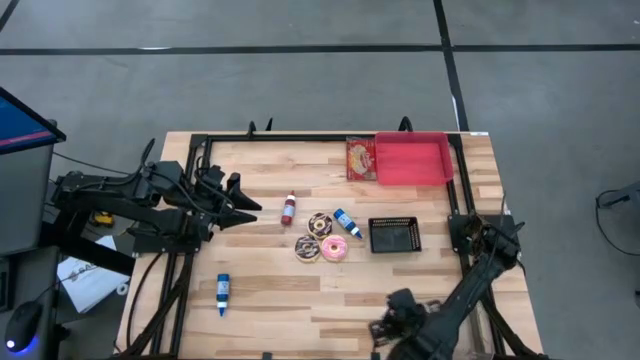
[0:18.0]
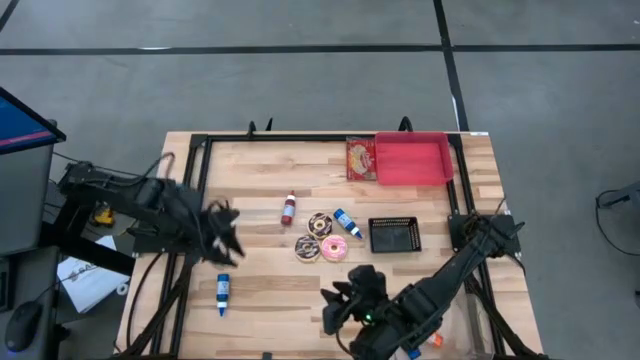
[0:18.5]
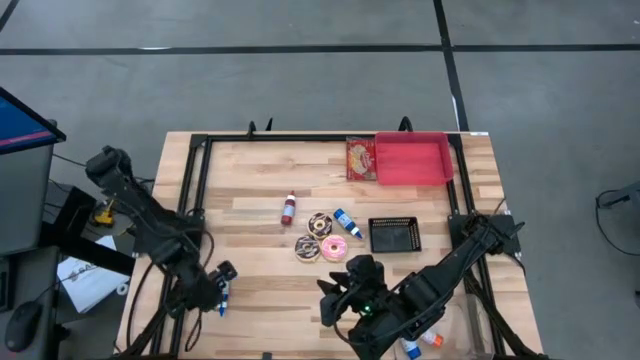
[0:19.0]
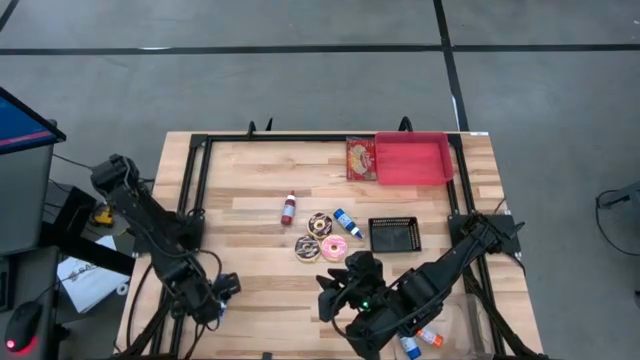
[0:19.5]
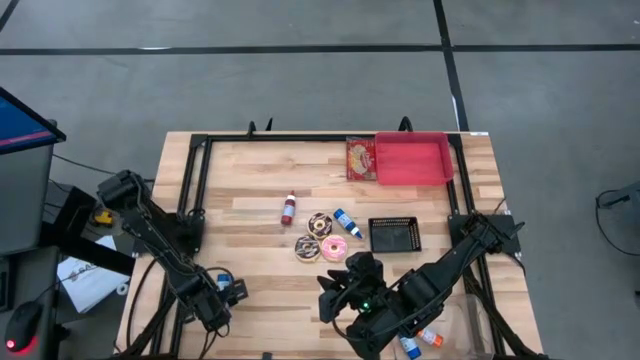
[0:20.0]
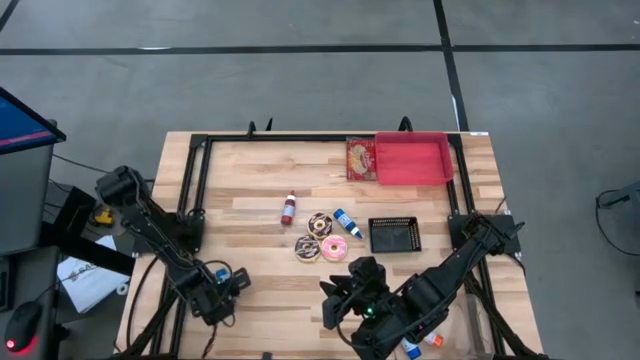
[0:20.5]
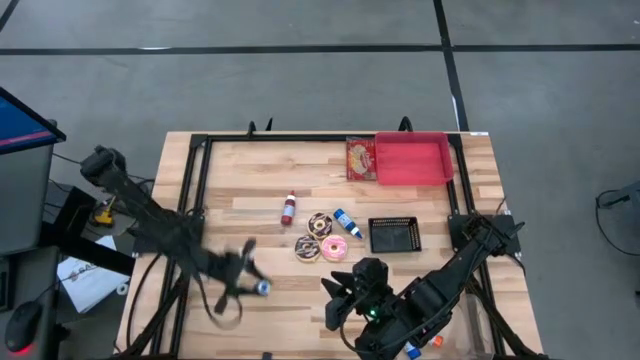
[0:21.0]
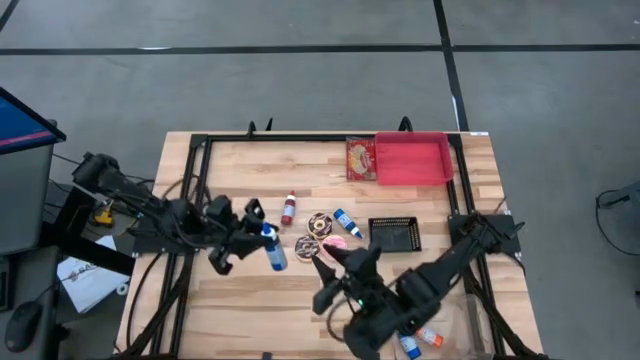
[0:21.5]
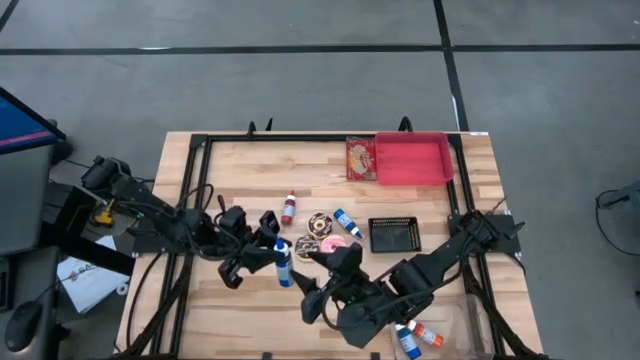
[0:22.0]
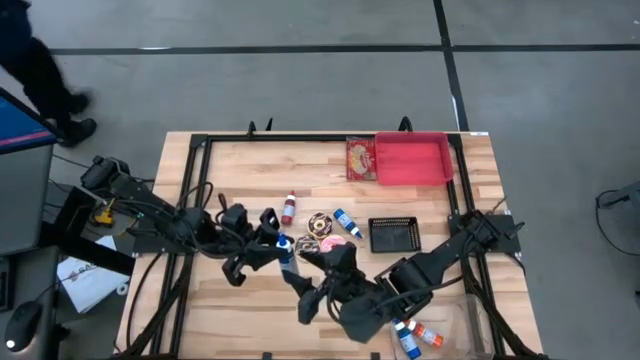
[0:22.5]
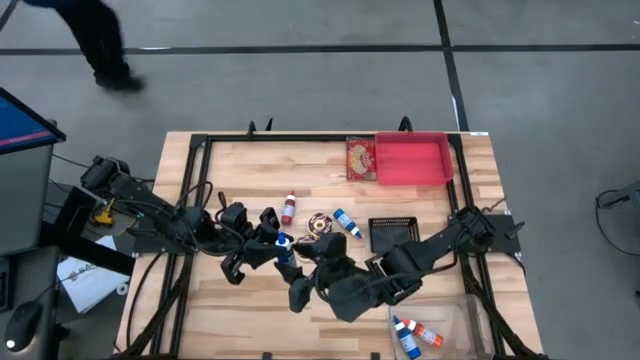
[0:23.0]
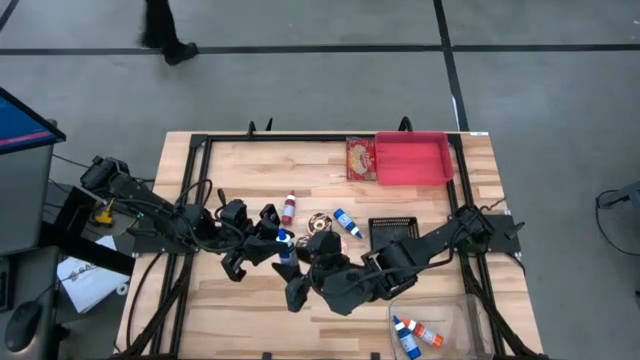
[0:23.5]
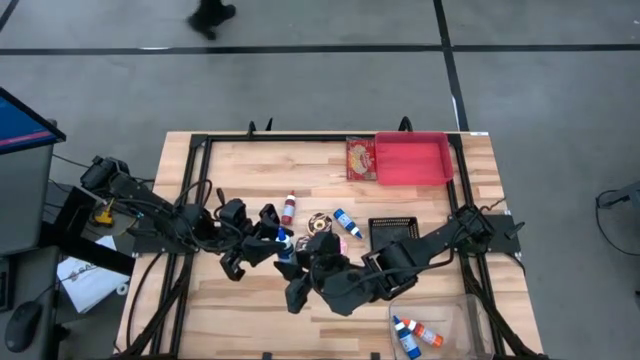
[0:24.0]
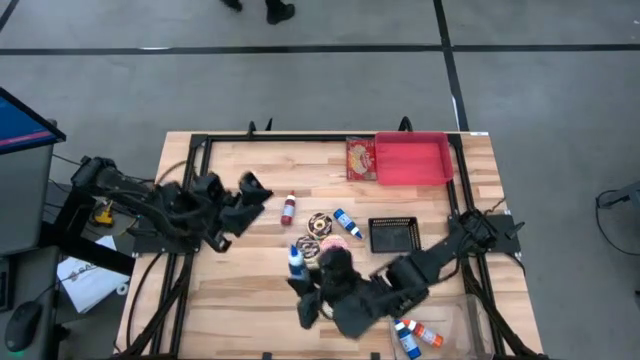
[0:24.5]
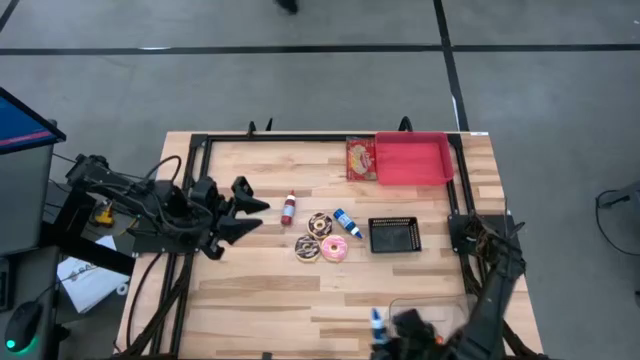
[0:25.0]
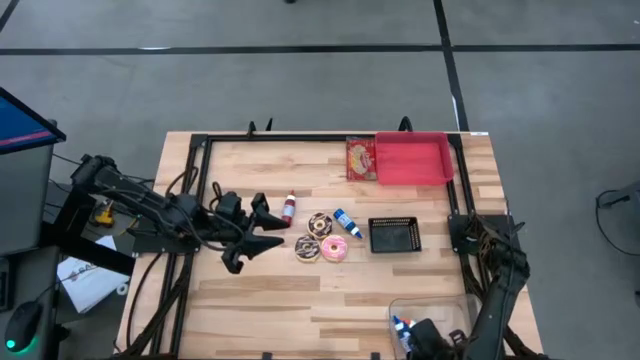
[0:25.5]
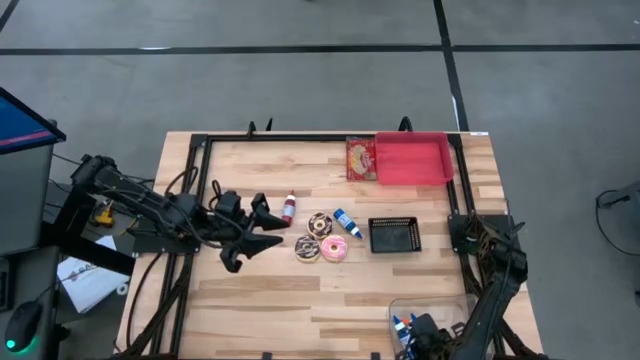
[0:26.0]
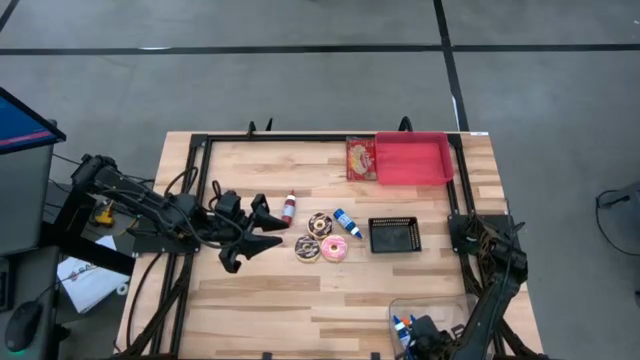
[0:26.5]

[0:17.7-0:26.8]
Put the left blue food coloring bottle into the transparent bin

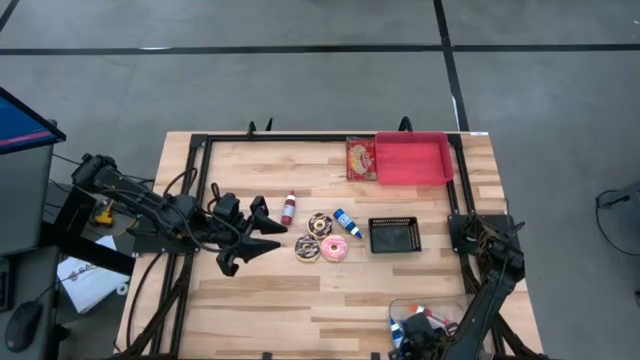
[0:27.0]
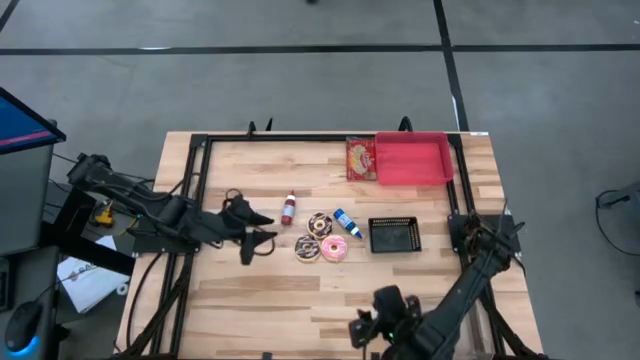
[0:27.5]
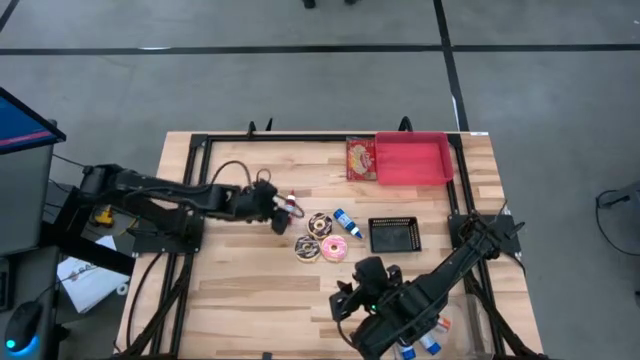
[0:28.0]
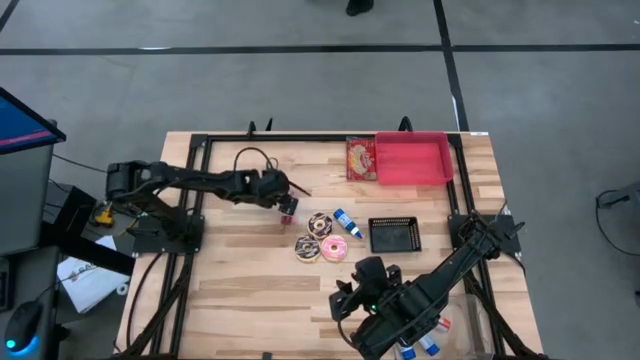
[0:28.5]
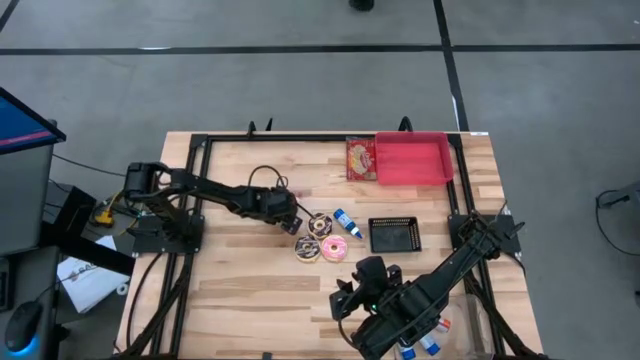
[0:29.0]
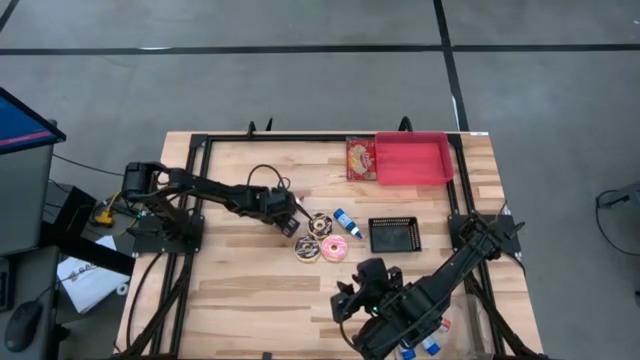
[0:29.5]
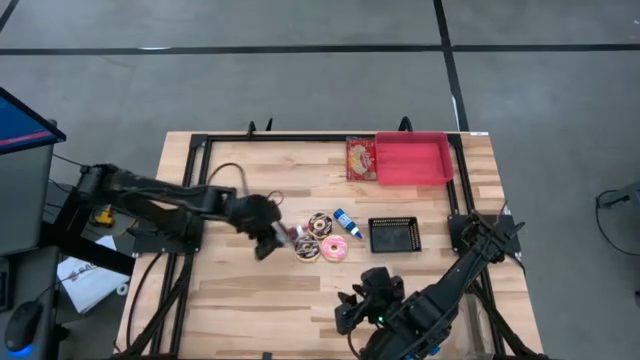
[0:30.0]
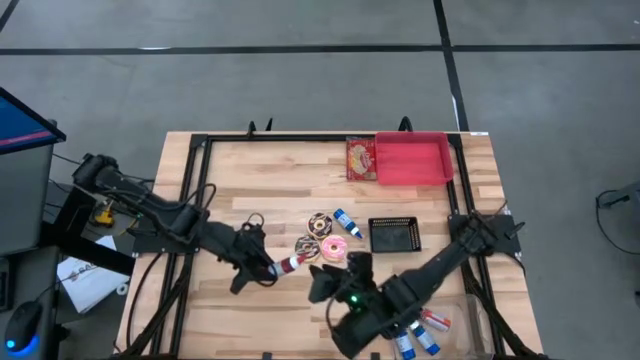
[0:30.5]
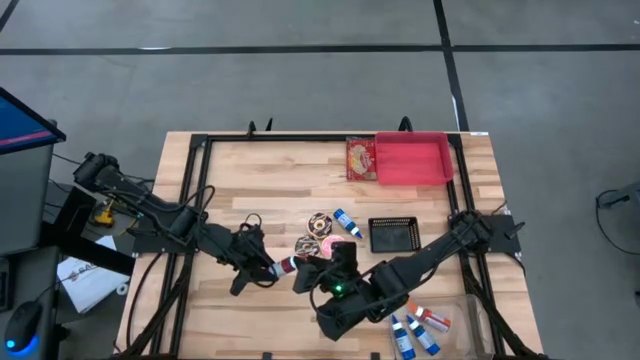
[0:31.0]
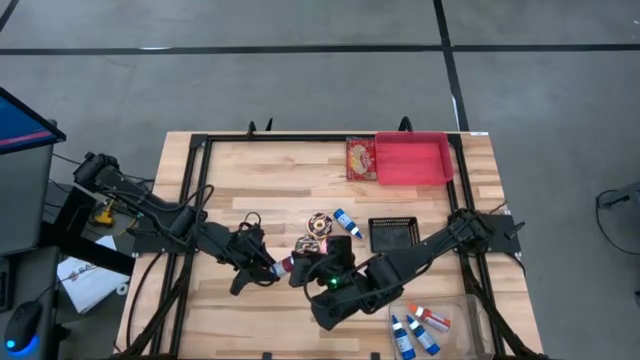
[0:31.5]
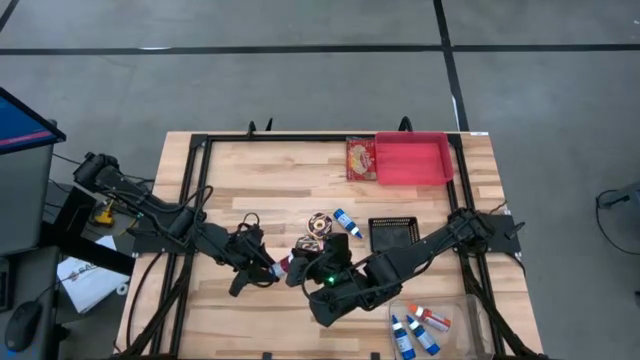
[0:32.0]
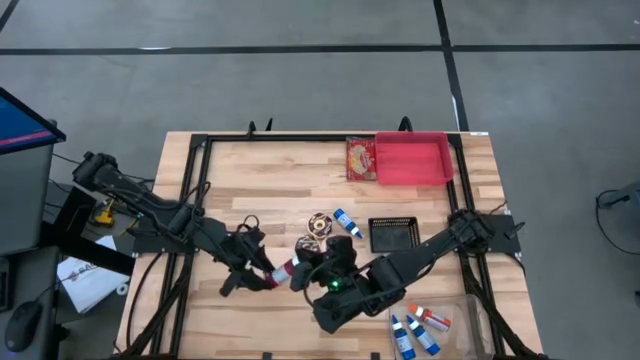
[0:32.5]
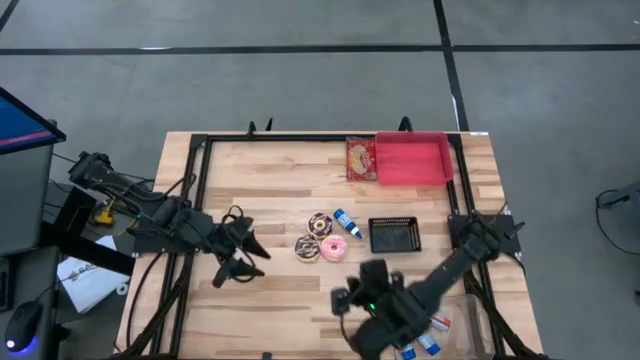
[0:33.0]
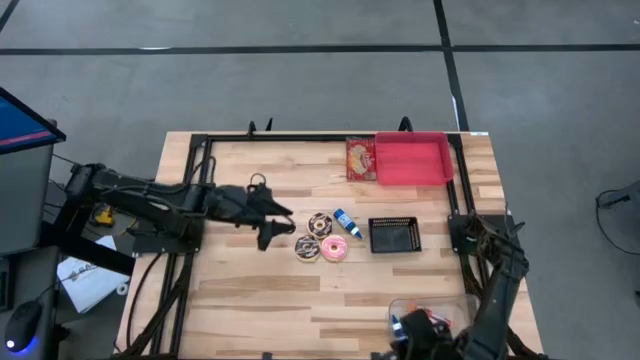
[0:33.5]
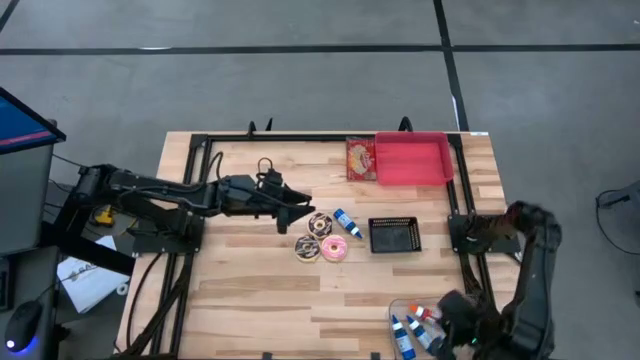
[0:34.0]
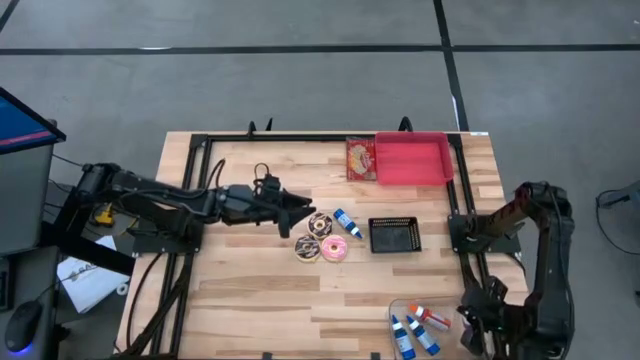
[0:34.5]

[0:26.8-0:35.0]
Put the red food coloring bottle into the transparent bin
